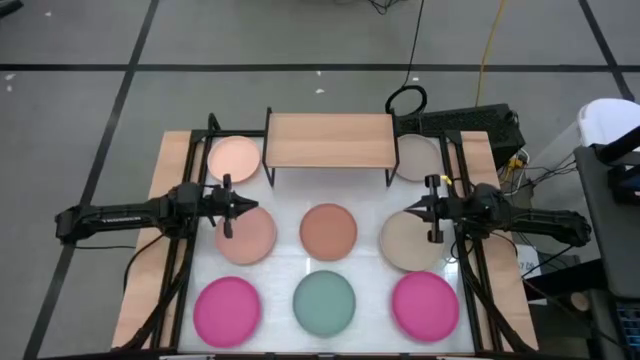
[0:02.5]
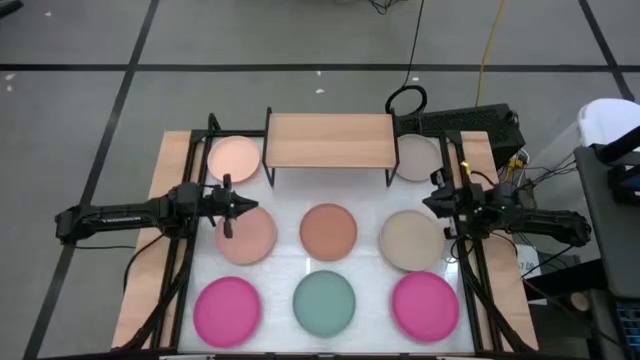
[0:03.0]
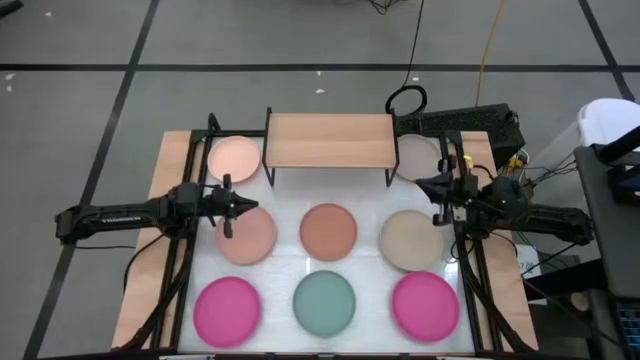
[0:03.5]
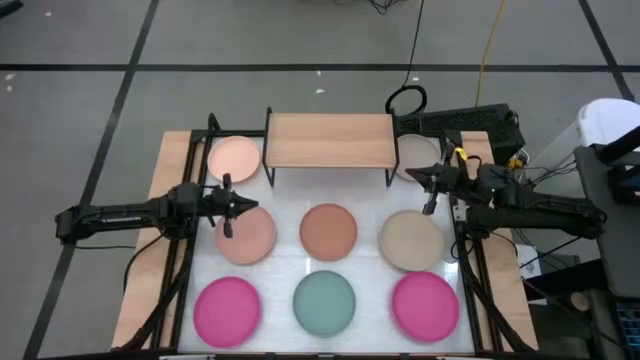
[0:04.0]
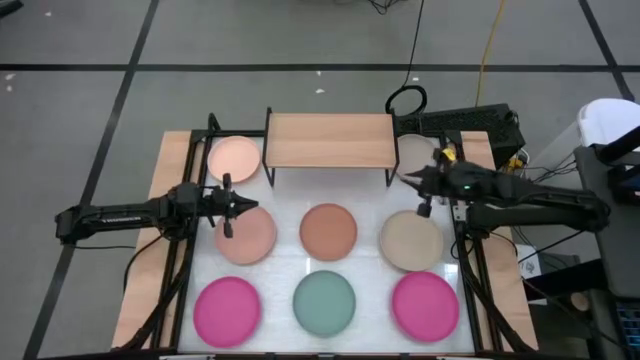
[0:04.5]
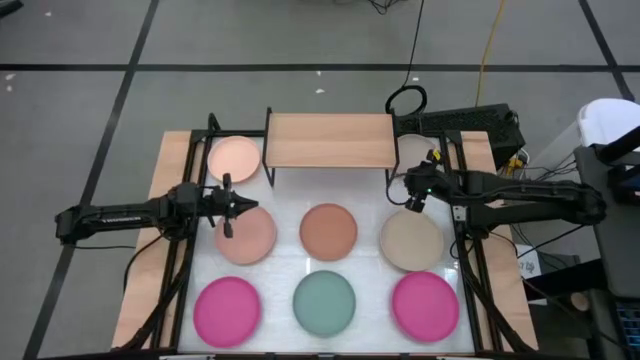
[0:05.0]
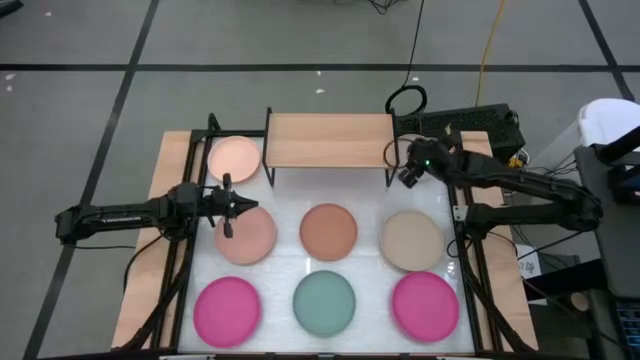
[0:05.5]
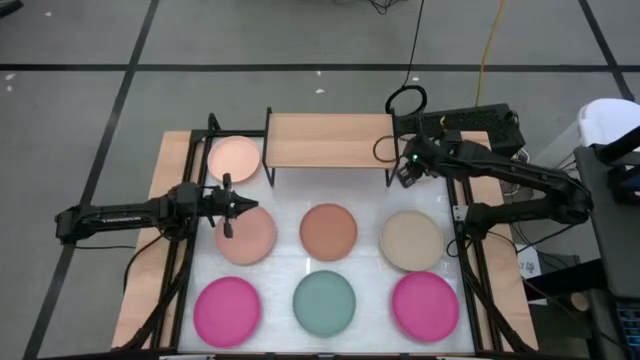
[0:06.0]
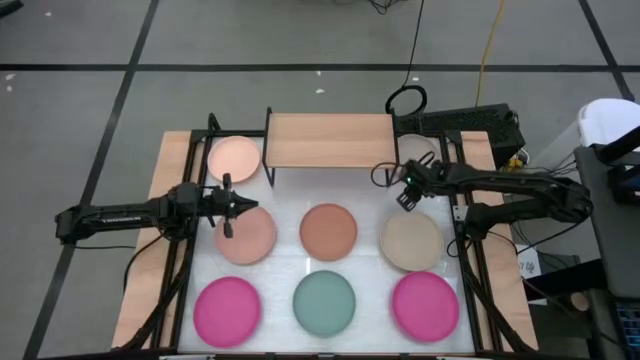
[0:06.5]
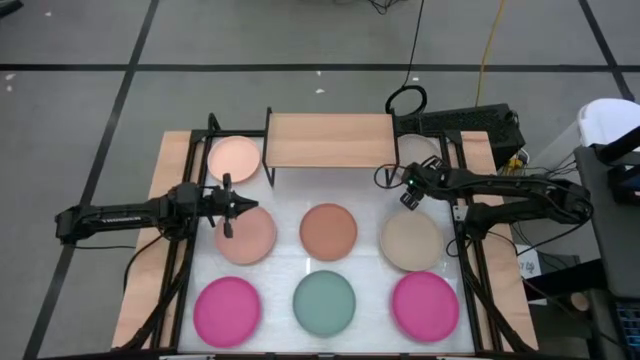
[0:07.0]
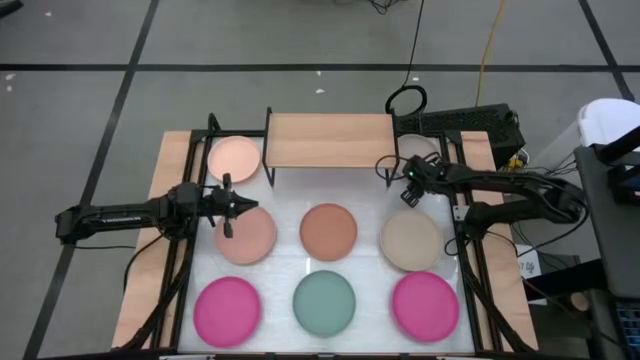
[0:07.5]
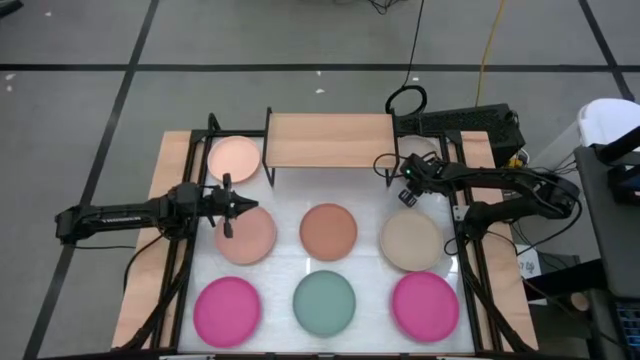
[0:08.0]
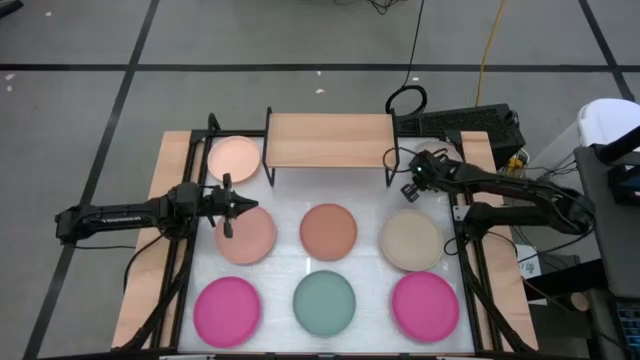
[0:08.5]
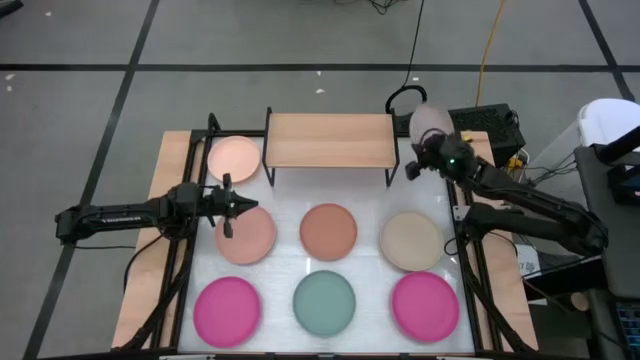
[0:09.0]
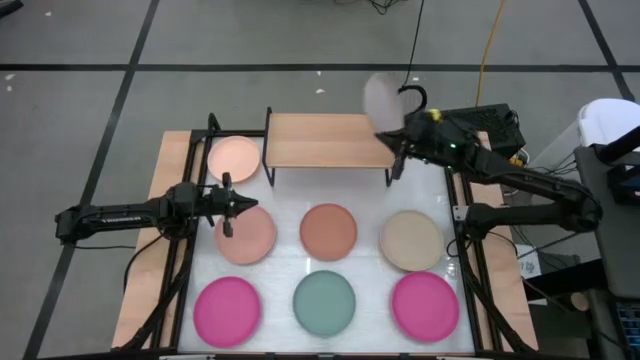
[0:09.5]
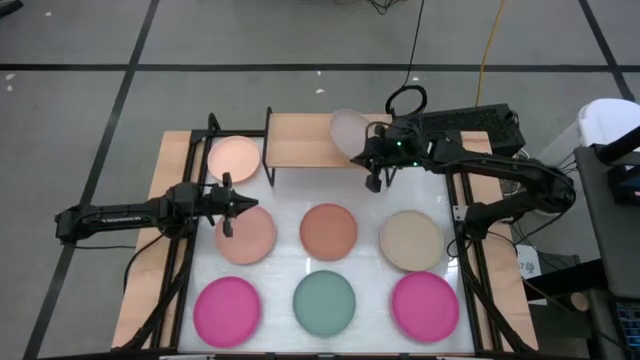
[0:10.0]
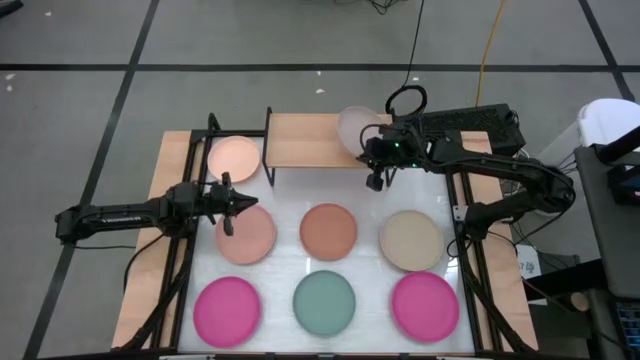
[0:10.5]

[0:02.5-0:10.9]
Task: Place and stack plates onto a shelf
Put the top gray plate on the shelf

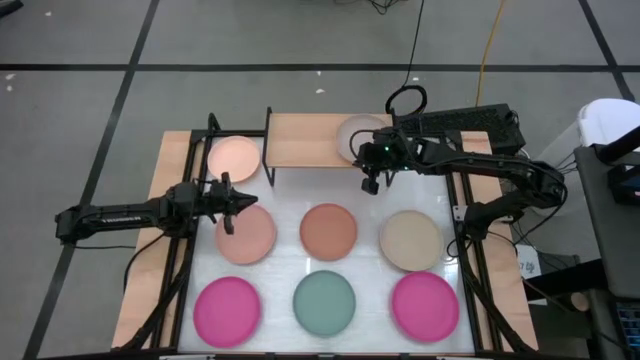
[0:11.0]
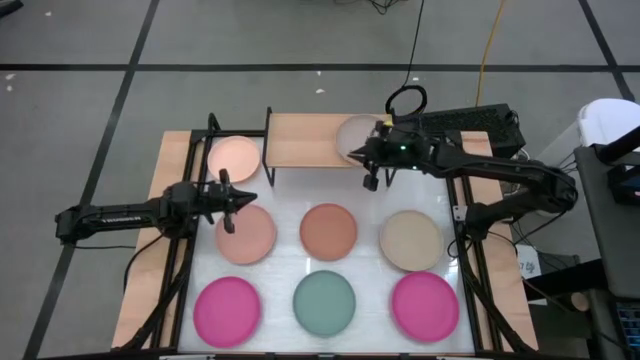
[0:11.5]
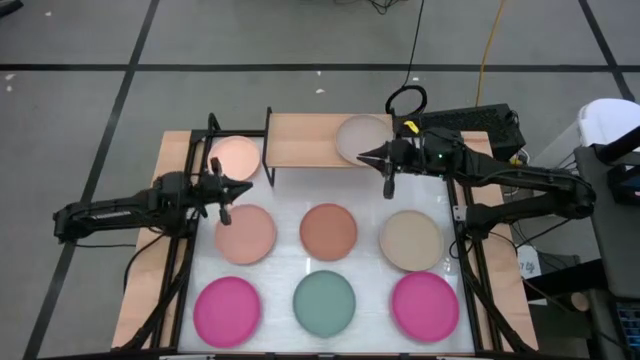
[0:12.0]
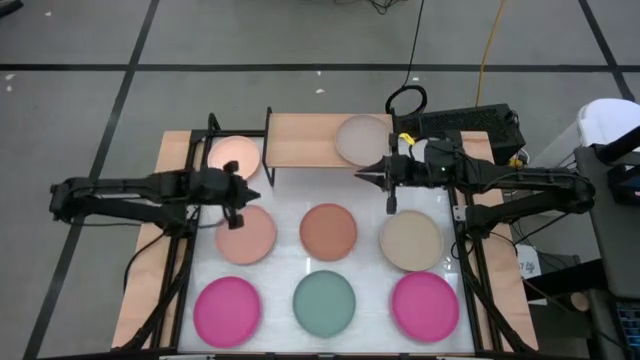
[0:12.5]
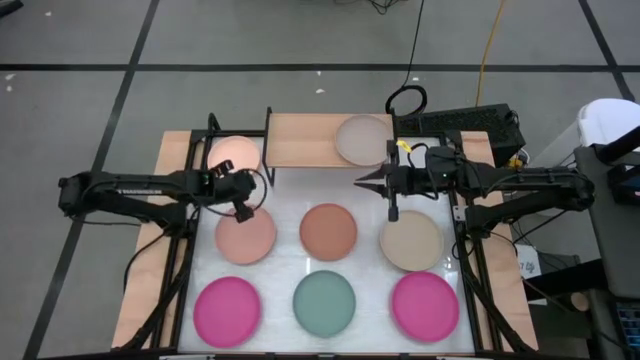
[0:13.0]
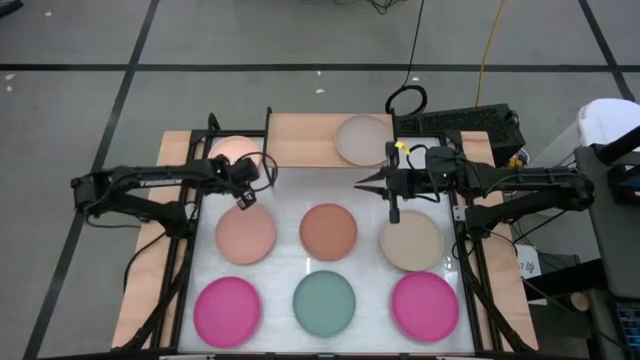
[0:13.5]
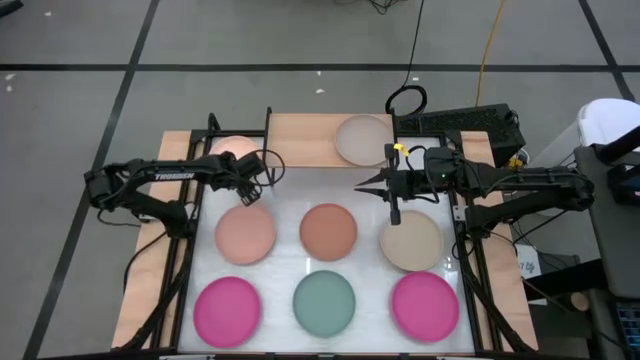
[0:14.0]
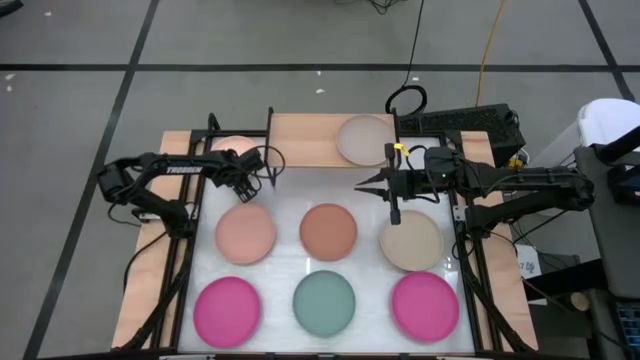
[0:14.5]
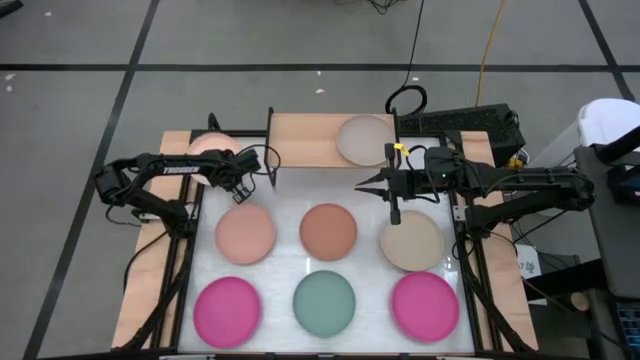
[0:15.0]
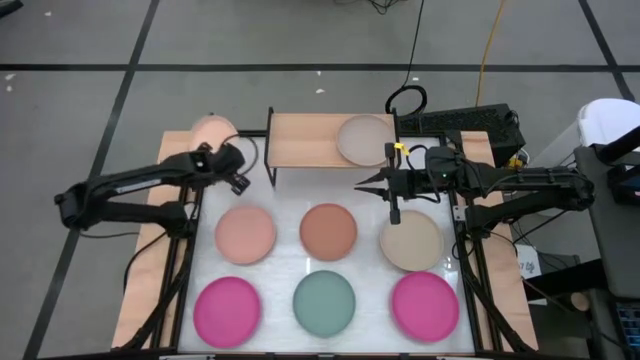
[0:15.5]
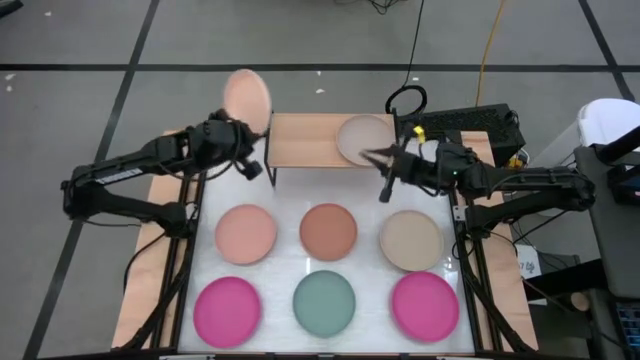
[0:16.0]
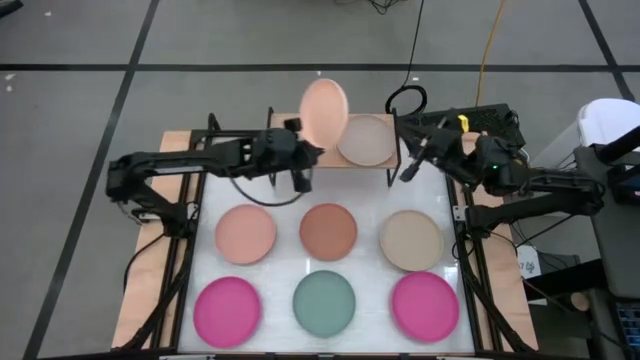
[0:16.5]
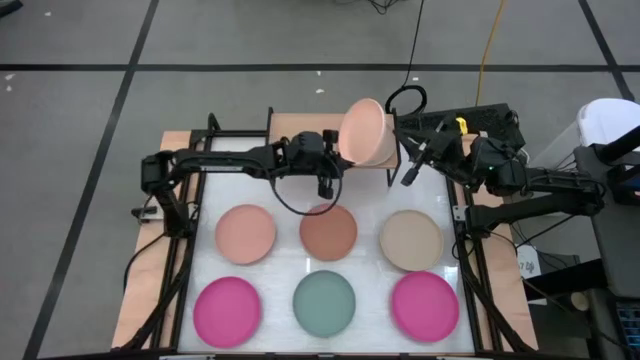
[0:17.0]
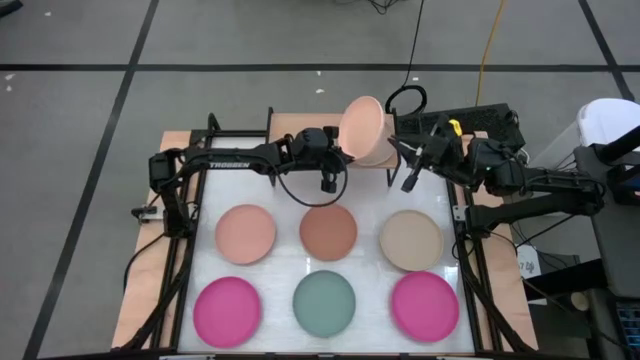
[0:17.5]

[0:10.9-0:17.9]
Stack the light orange plate on the gray plate

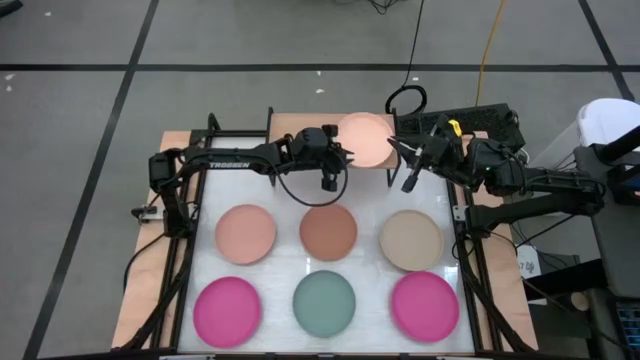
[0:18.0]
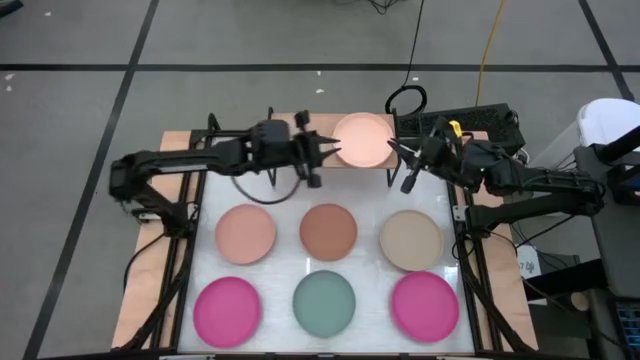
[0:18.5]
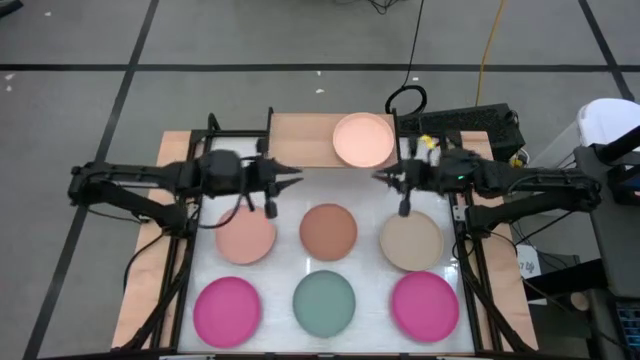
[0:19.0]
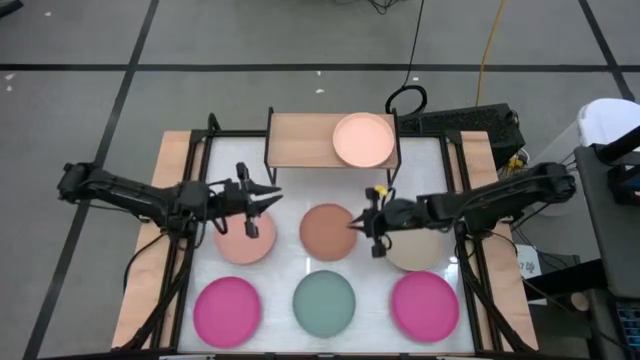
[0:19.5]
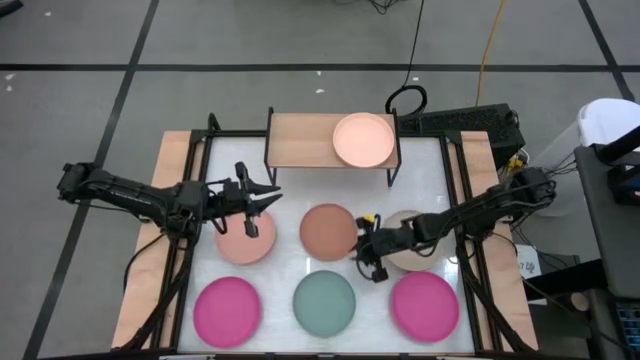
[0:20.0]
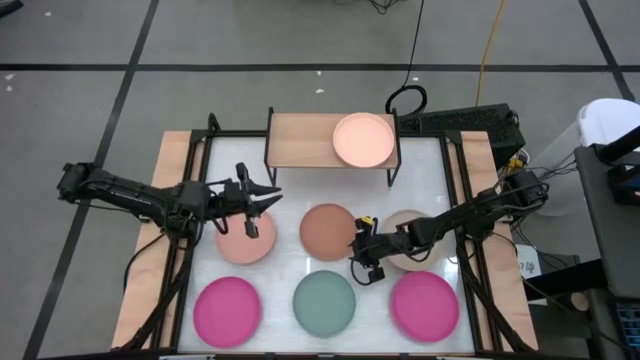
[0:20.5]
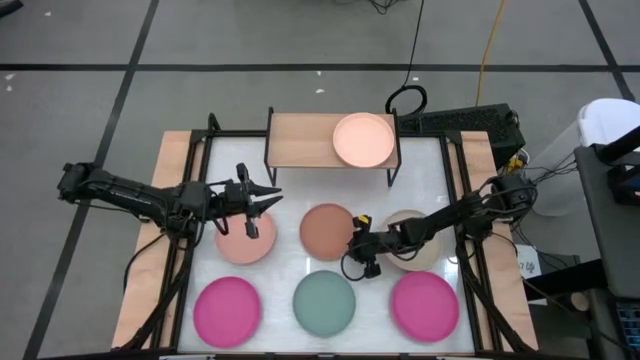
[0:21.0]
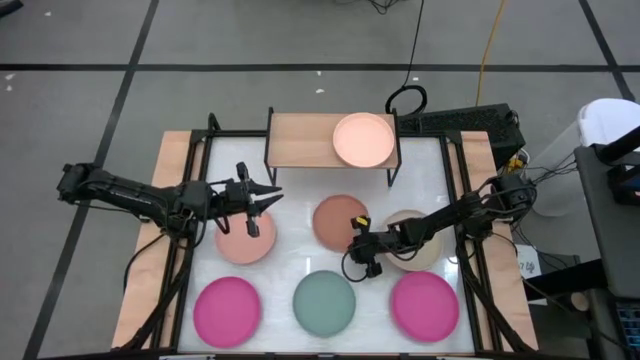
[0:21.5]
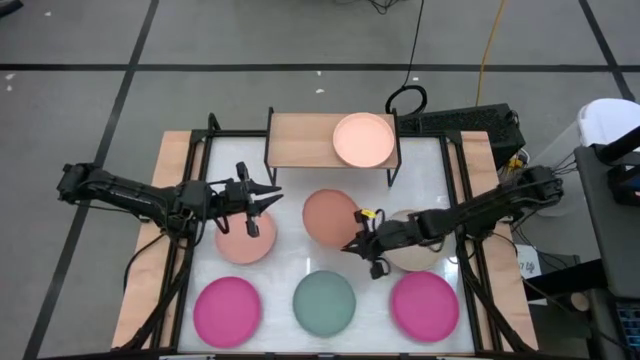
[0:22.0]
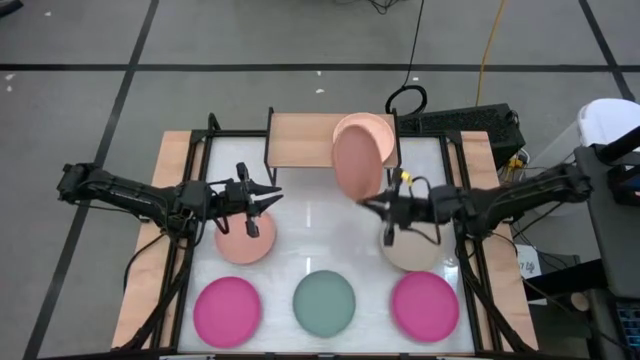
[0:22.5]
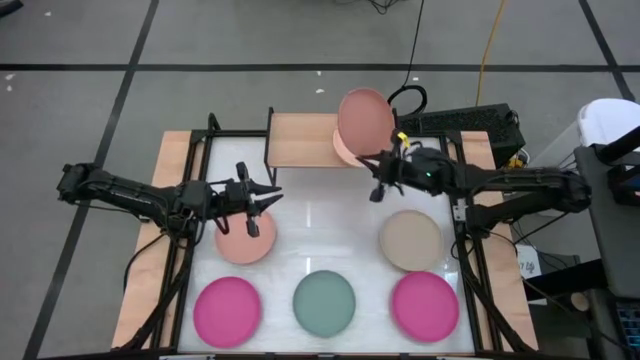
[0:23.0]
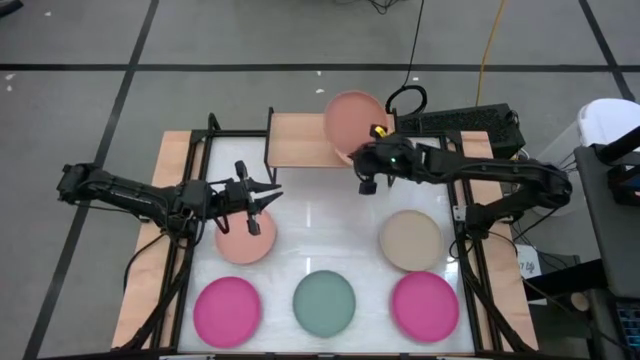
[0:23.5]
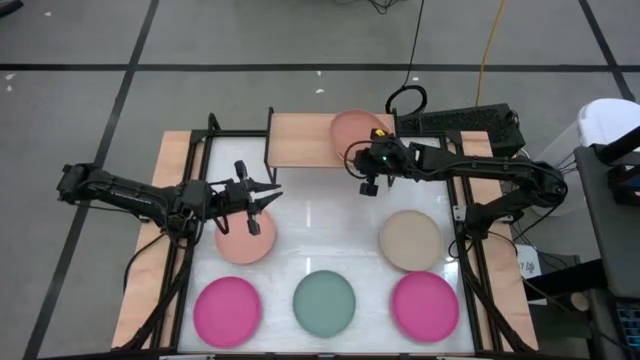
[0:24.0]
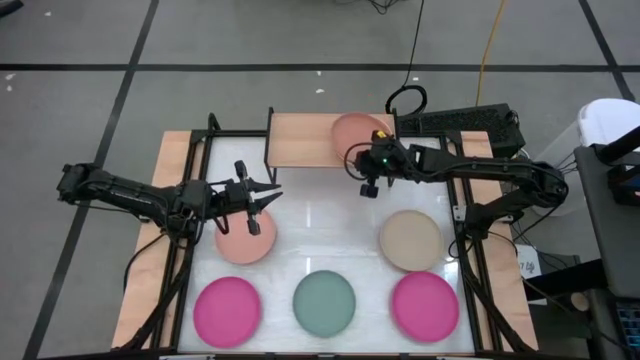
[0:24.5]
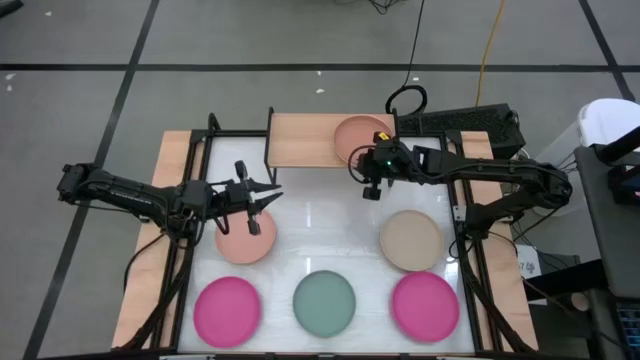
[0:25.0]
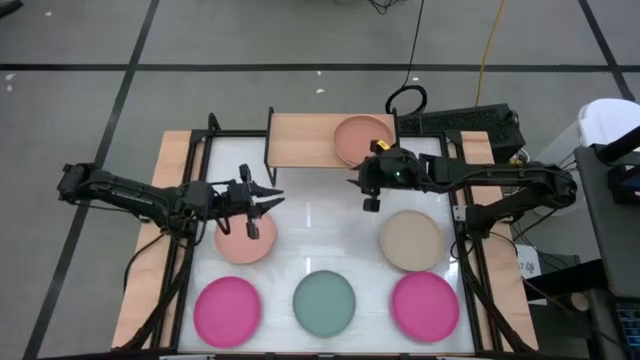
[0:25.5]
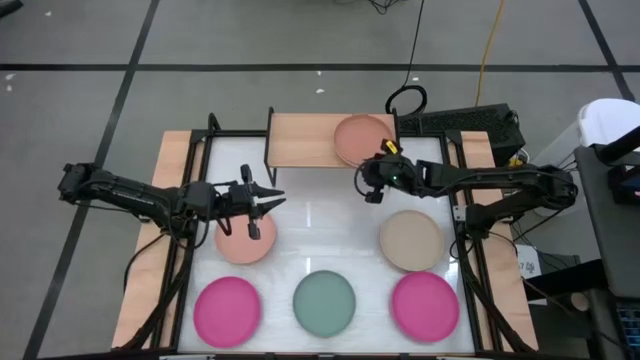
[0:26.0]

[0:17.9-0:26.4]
Stack the brown plate on the light orange plate
